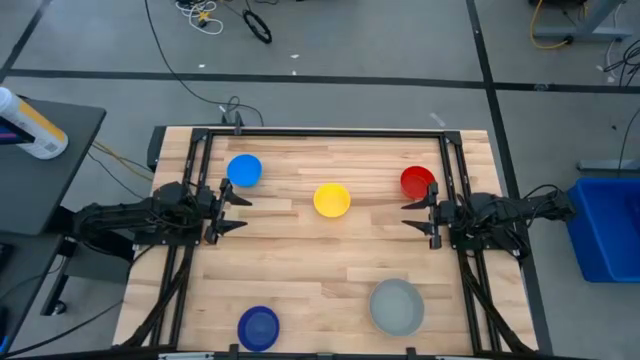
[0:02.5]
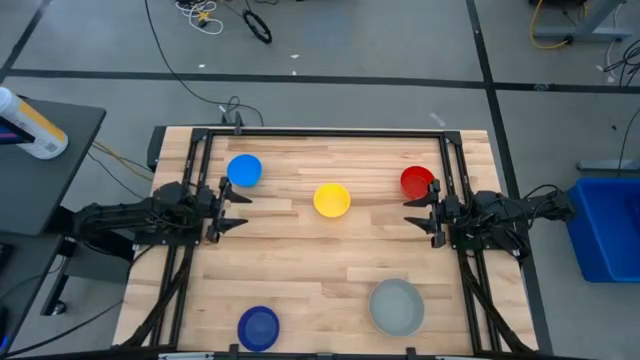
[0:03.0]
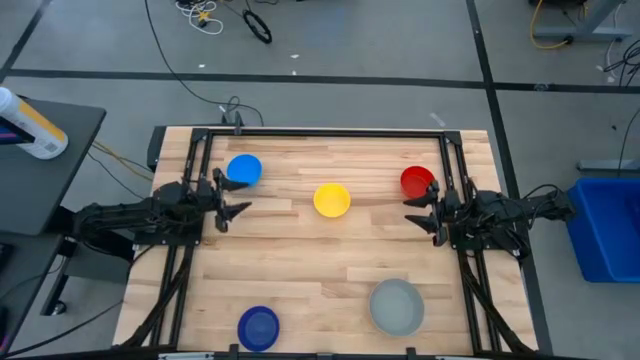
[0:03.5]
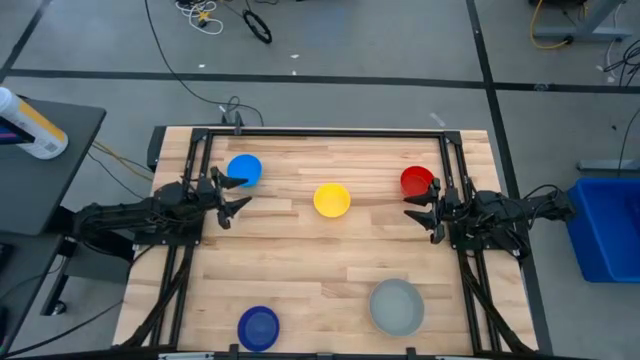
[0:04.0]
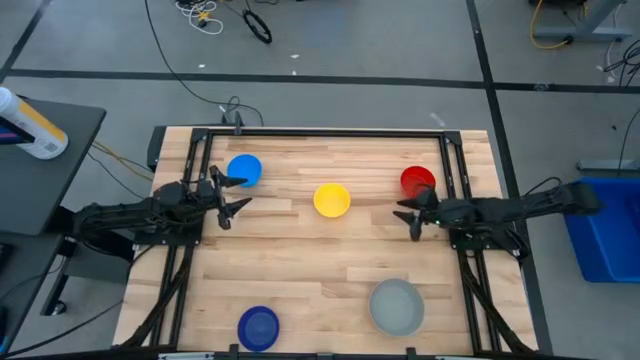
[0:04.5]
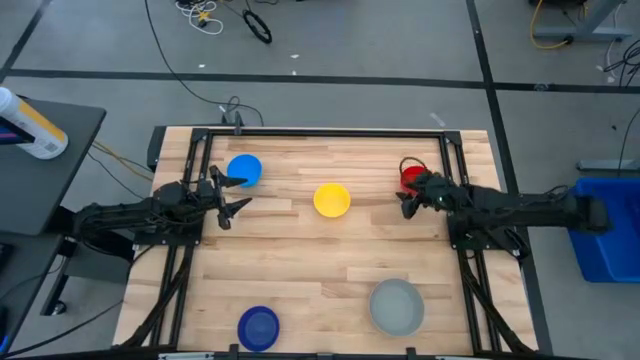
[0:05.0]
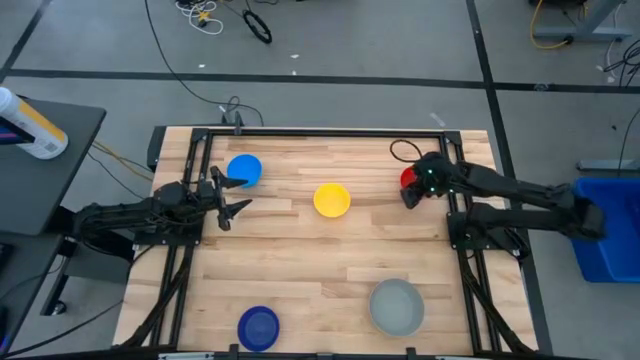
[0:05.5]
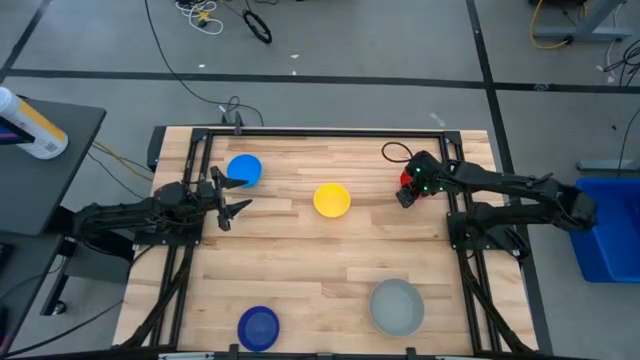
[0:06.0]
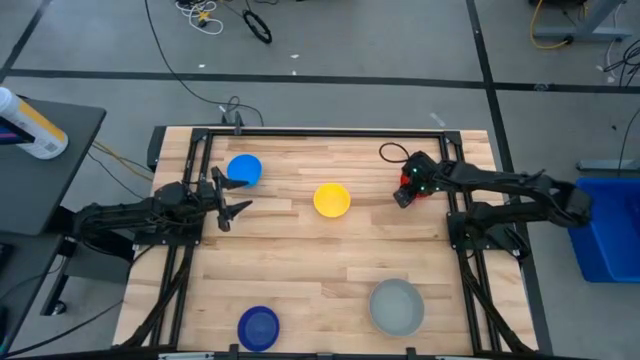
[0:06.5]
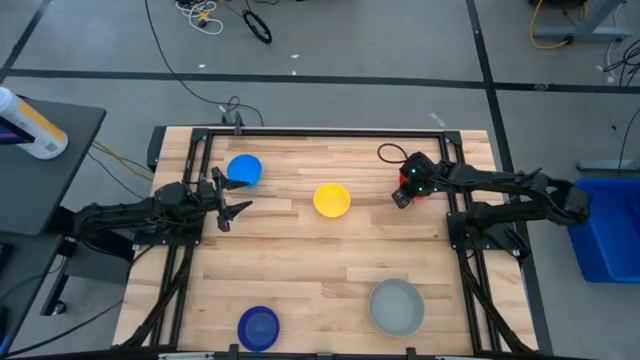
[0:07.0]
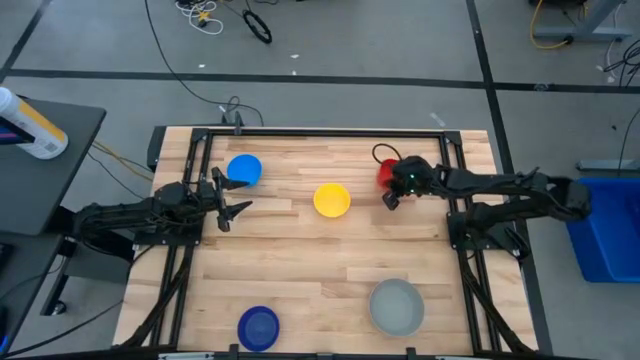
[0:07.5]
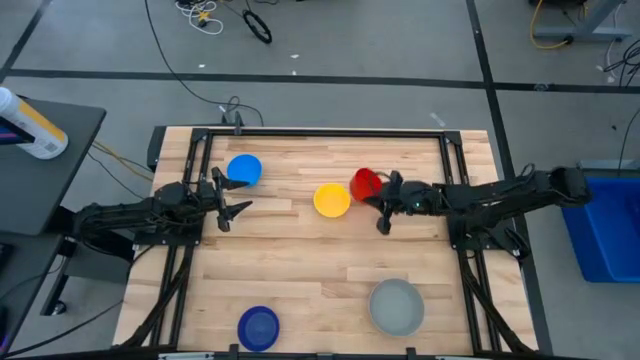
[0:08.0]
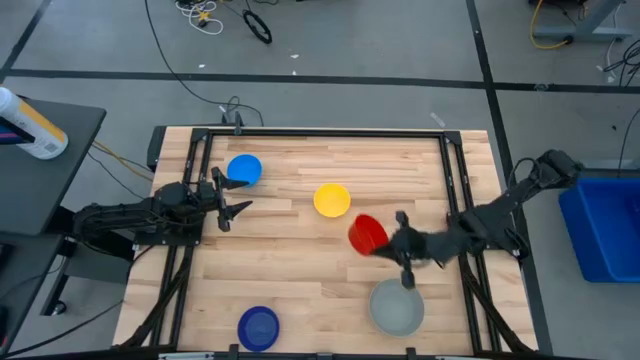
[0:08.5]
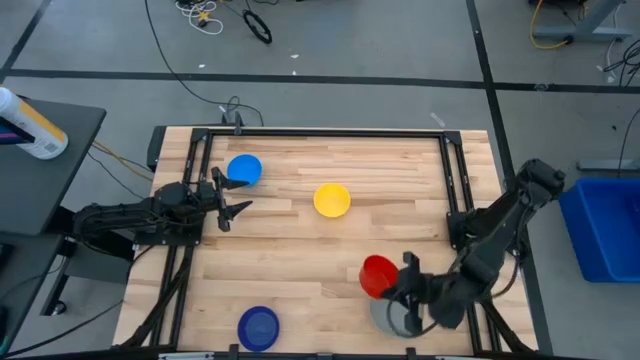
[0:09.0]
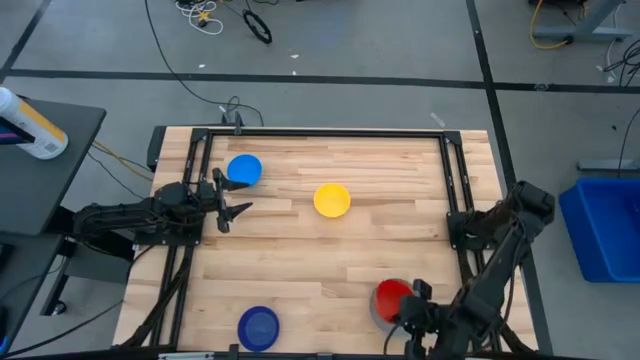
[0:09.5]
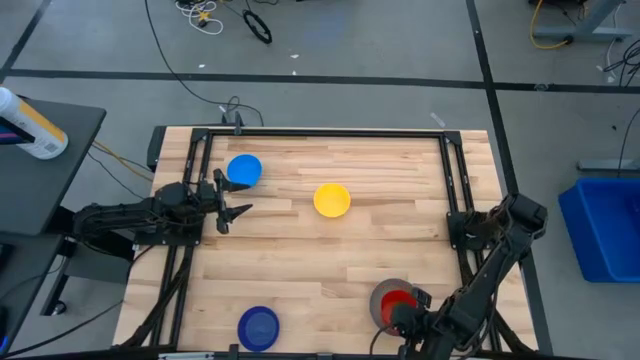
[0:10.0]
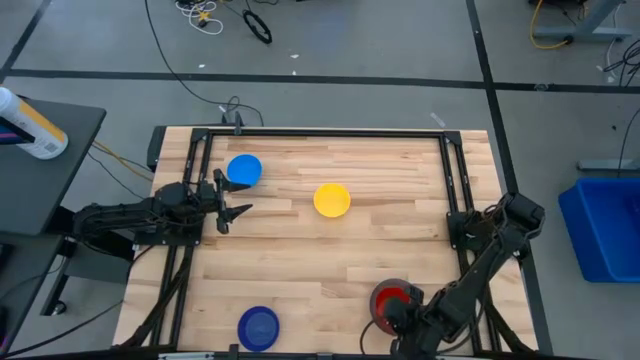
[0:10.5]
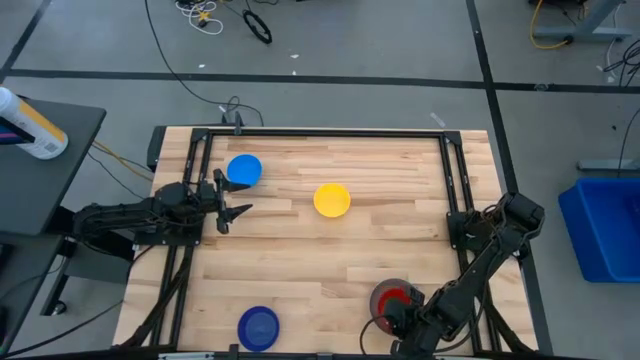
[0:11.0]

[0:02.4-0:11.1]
Stack the red bowl on the gray bowl

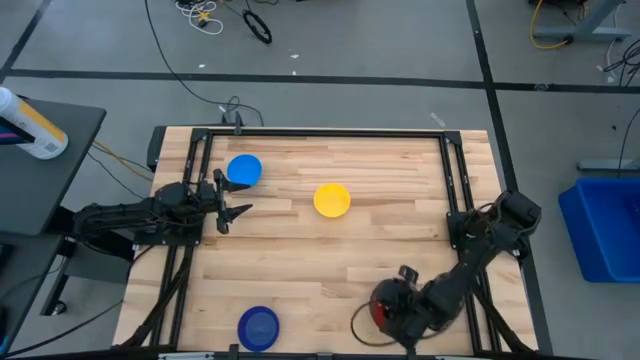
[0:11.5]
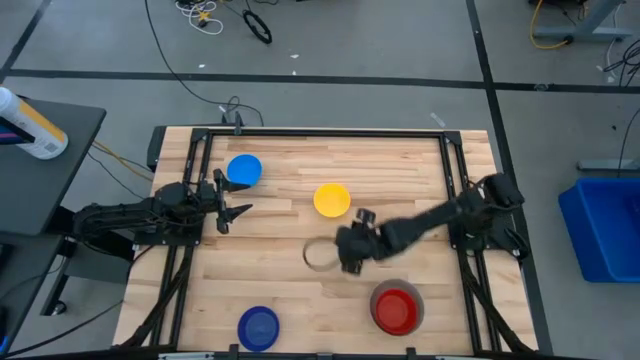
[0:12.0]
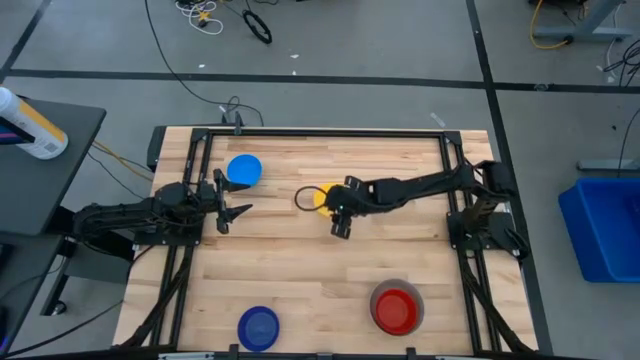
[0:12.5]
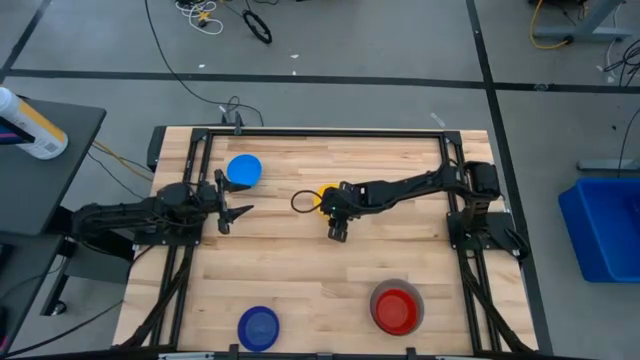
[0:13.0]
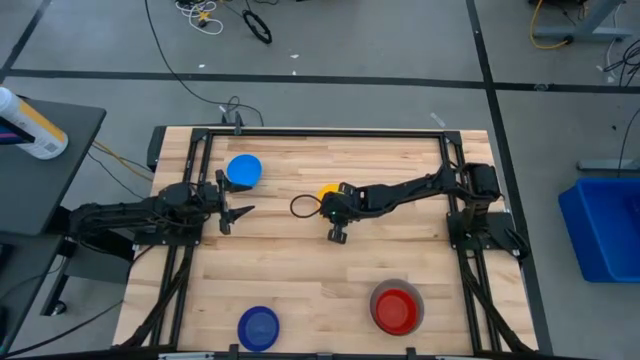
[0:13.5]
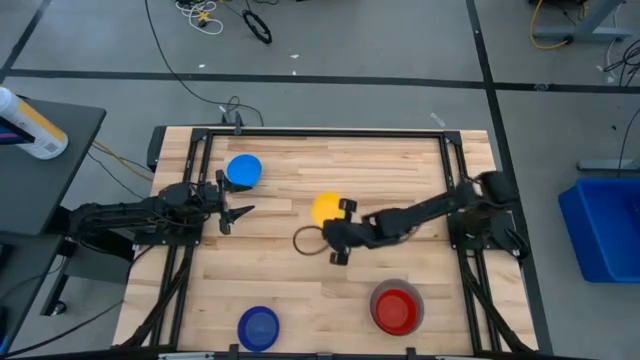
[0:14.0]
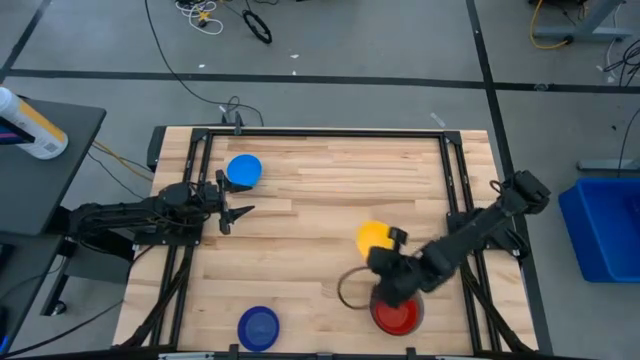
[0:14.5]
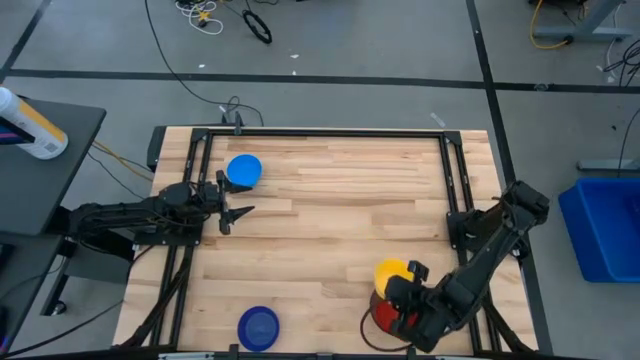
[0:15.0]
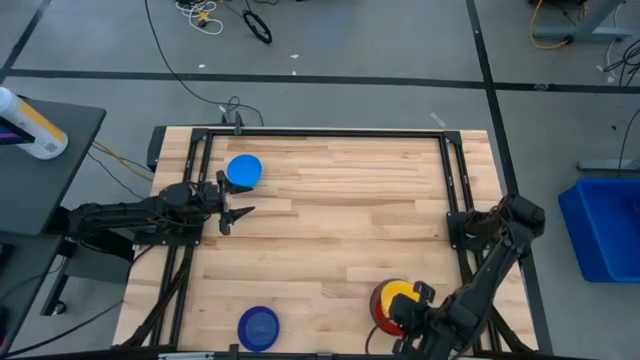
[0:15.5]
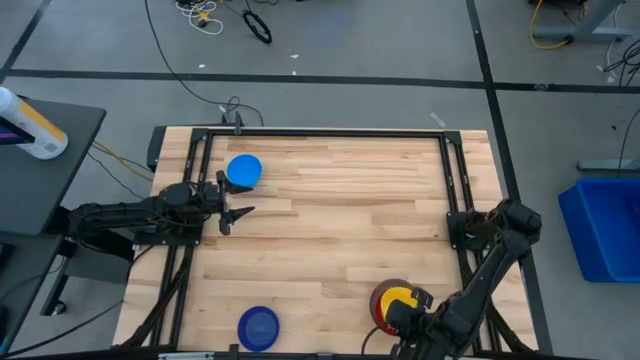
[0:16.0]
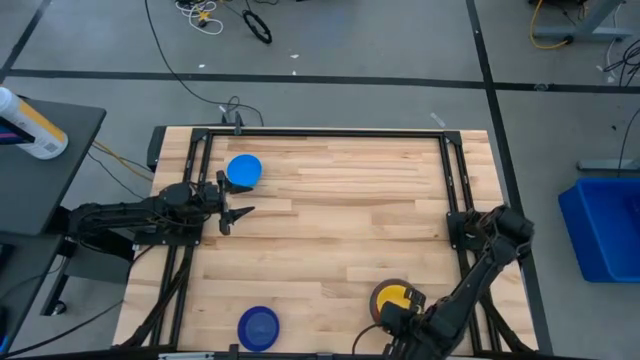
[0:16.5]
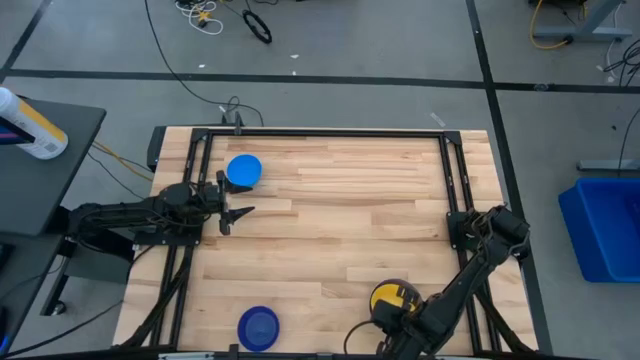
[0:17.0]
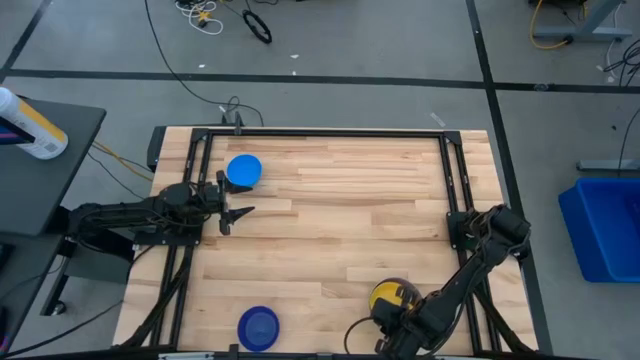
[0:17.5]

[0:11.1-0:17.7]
Stack the yellow bowl on the red bowl

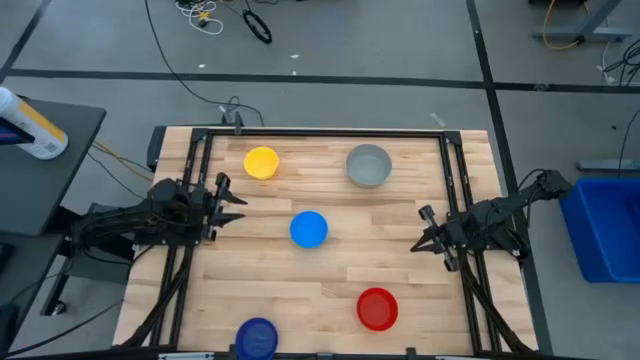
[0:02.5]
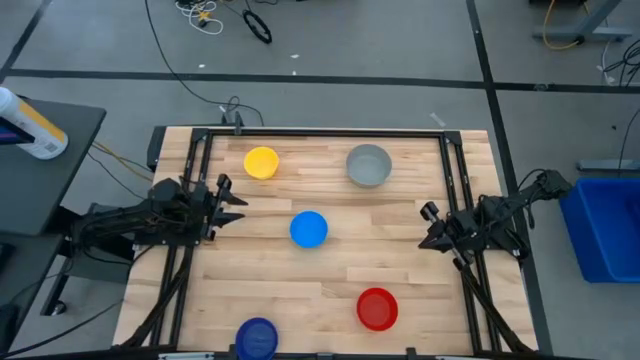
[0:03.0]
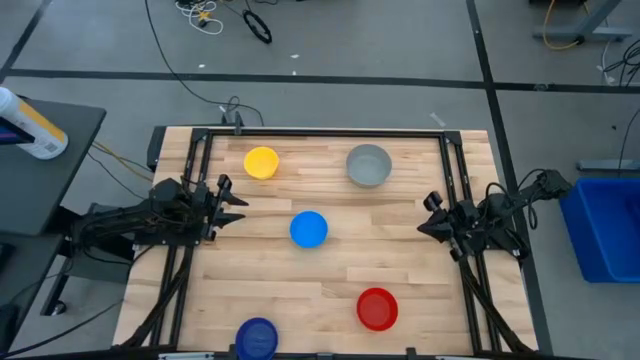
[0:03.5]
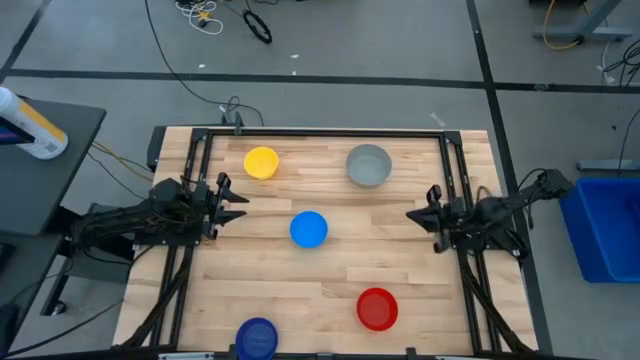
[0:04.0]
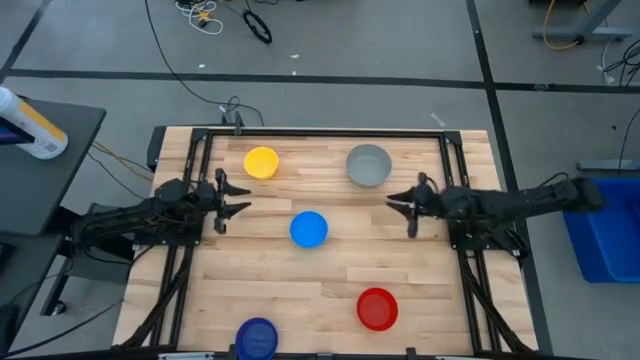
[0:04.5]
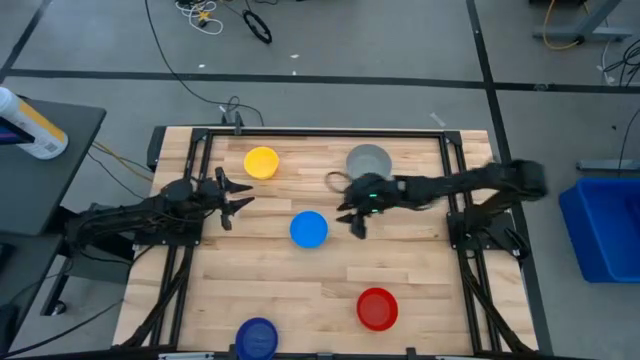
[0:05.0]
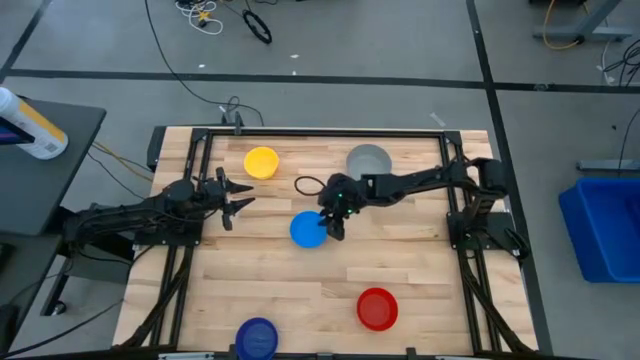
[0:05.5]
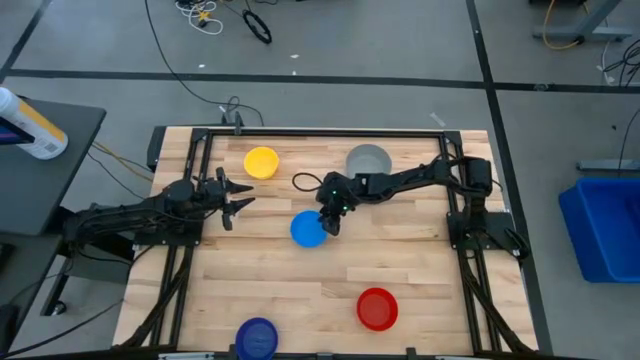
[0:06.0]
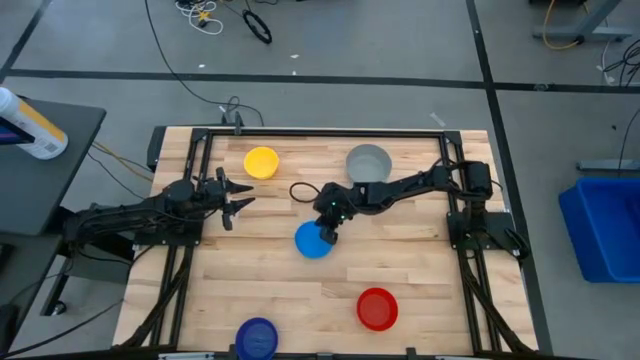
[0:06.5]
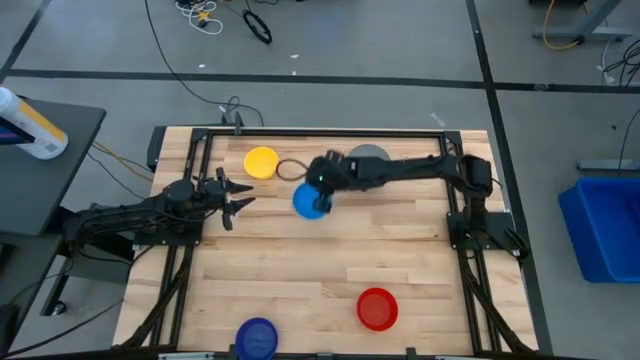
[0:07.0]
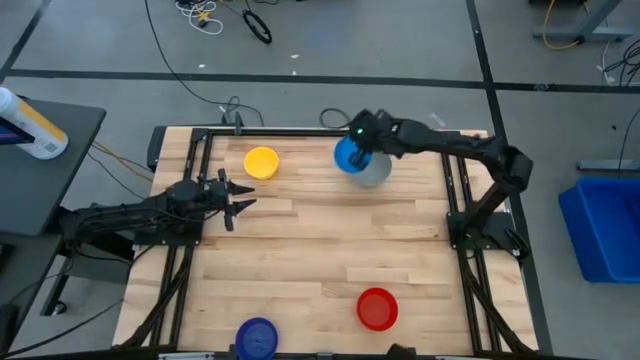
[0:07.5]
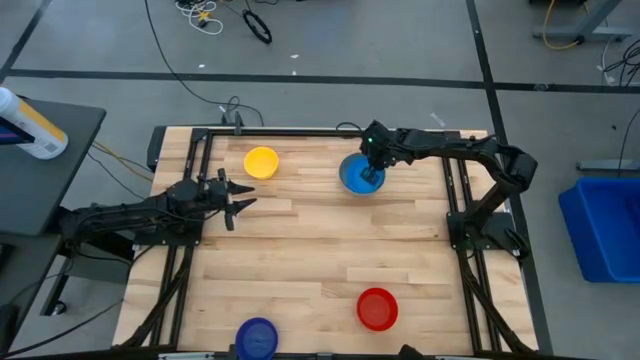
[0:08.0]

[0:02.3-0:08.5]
Stack the light blue bowl on the gray bowl
